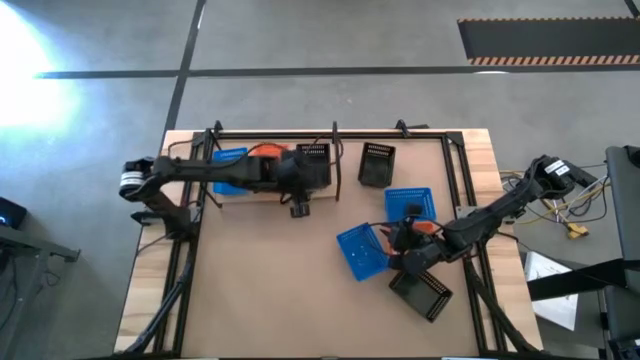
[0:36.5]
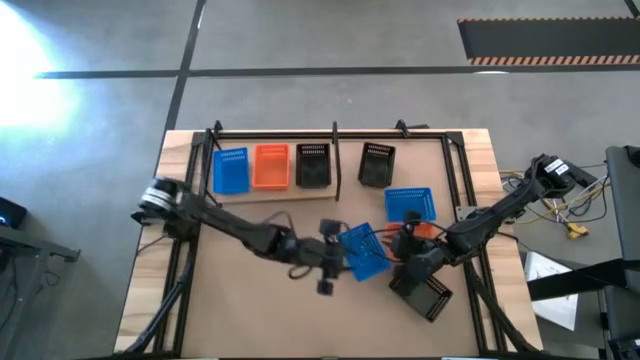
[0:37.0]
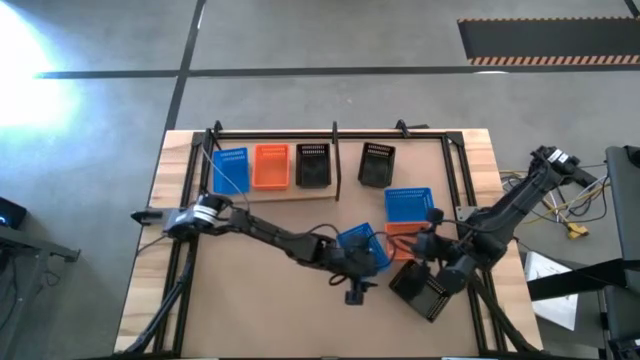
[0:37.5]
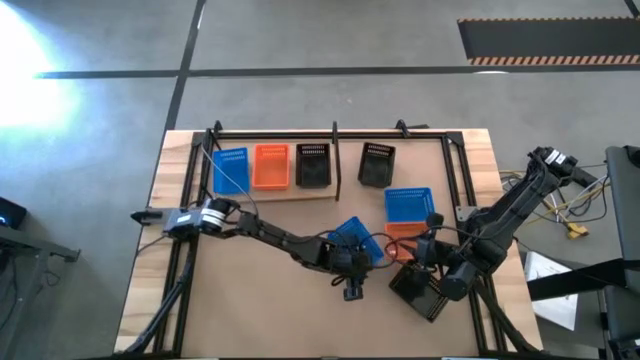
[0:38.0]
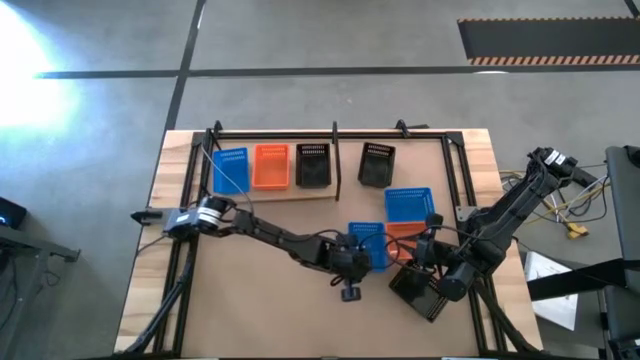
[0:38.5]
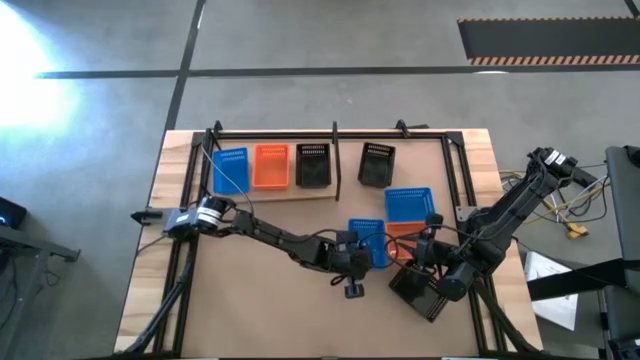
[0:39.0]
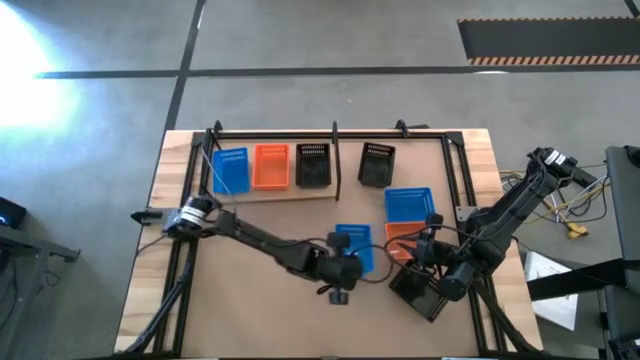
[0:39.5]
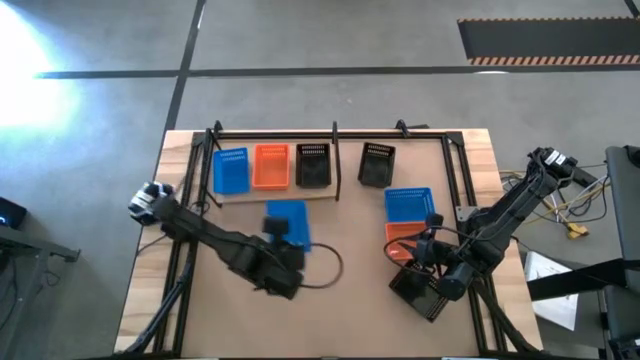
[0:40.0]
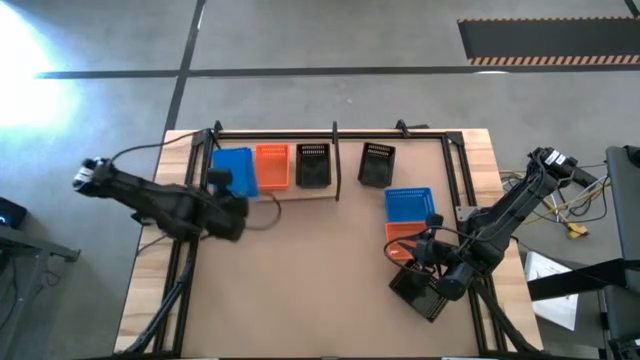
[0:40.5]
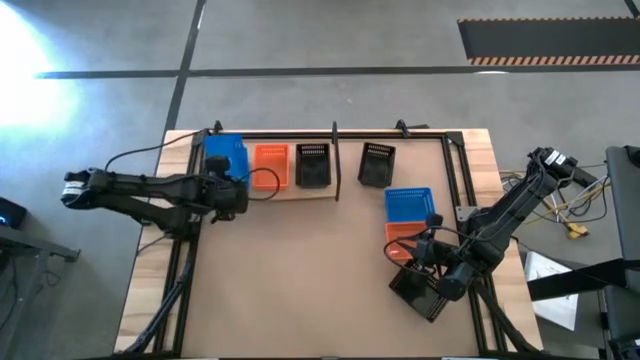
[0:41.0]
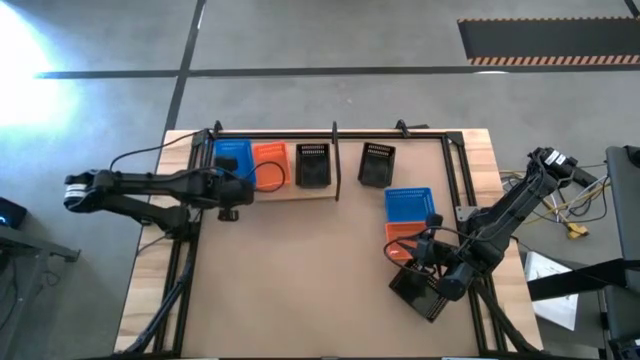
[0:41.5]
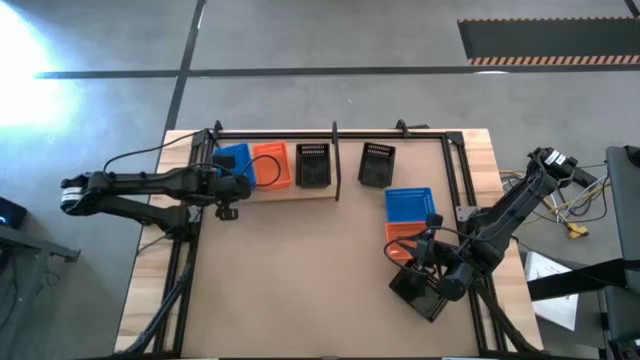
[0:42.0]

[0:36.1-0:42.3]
Task: Stack baskets on shelf by color
Stack the bottom blue basket on top of the other blue basket on the shelf

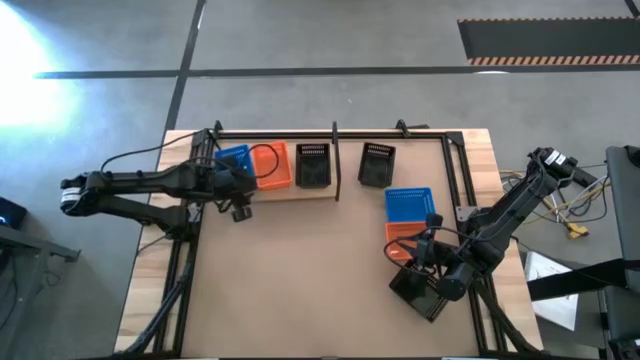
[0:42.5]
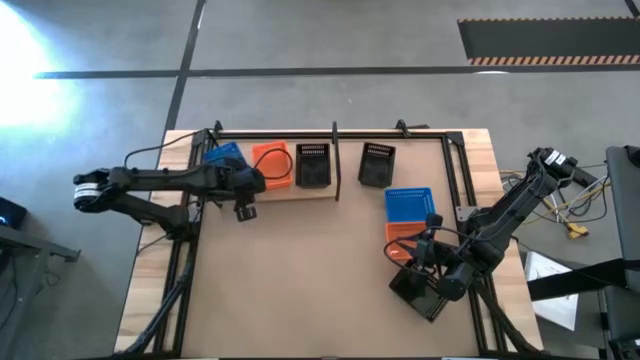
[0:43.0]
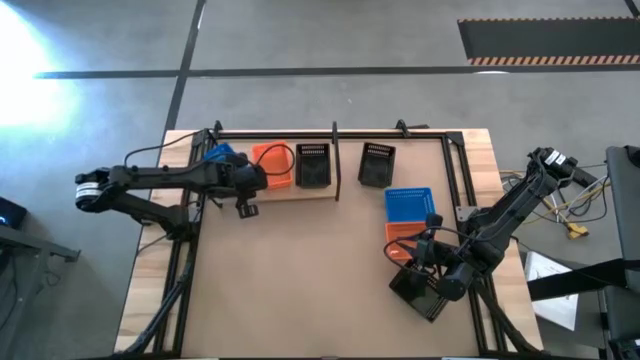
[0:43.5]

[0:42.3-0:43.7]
Adjust the baskets on the shelf

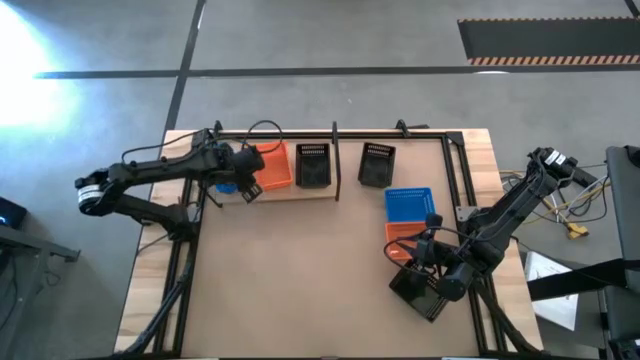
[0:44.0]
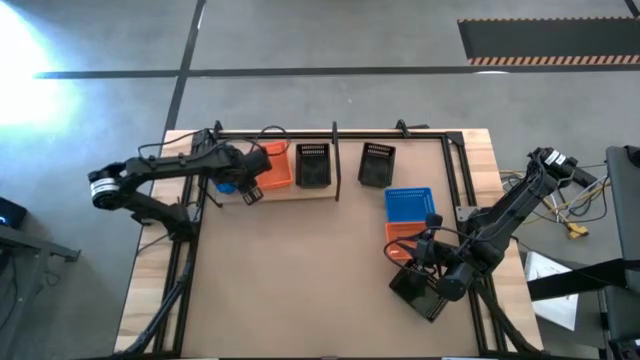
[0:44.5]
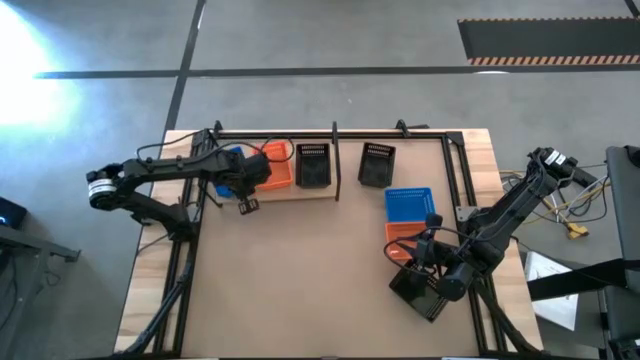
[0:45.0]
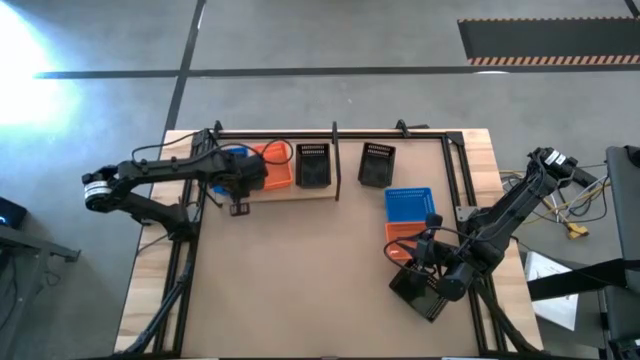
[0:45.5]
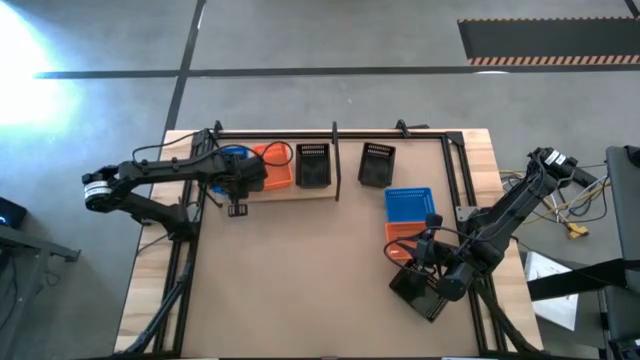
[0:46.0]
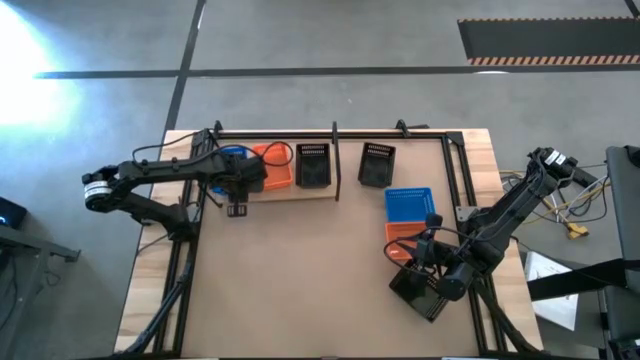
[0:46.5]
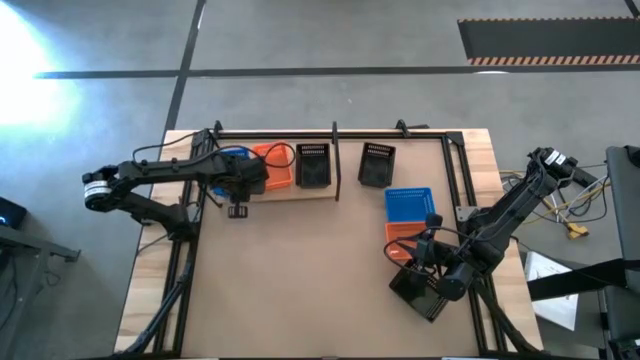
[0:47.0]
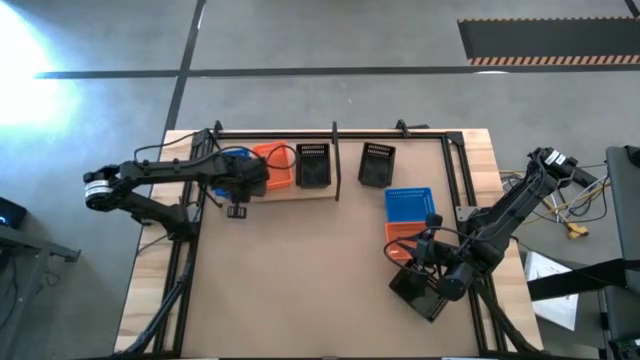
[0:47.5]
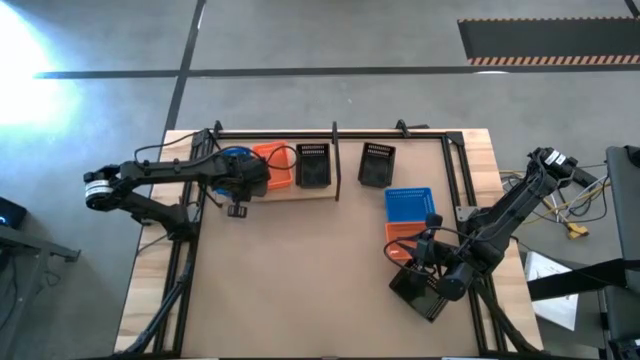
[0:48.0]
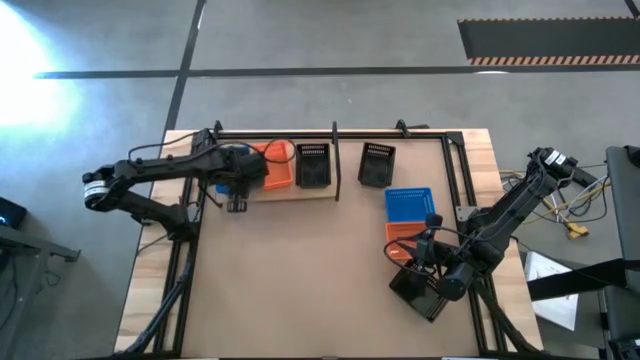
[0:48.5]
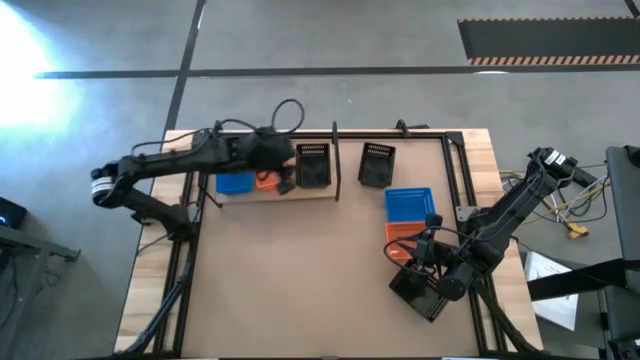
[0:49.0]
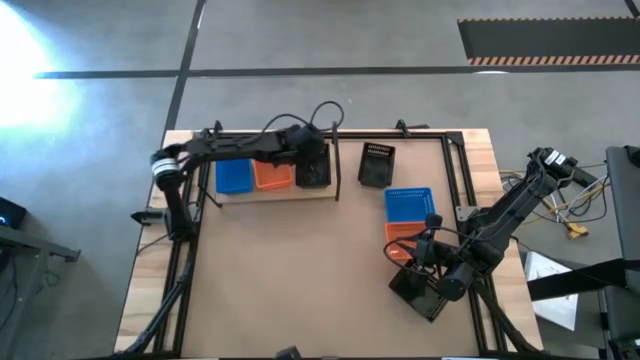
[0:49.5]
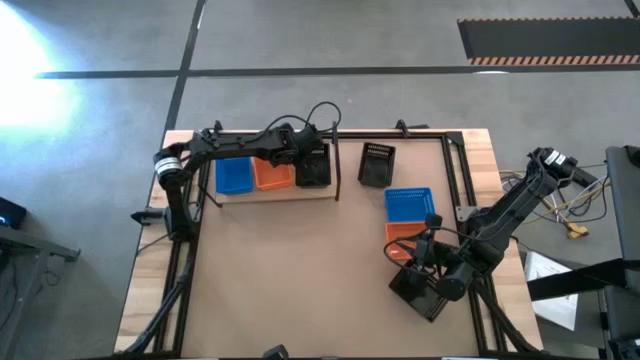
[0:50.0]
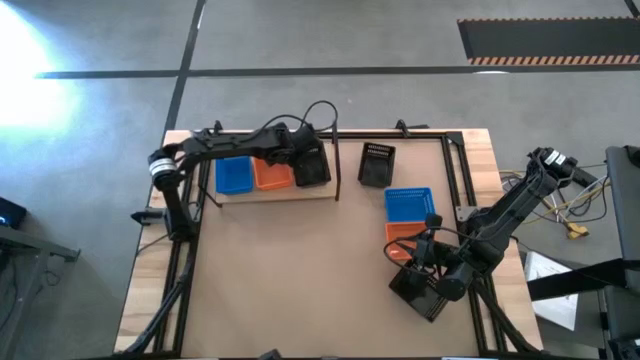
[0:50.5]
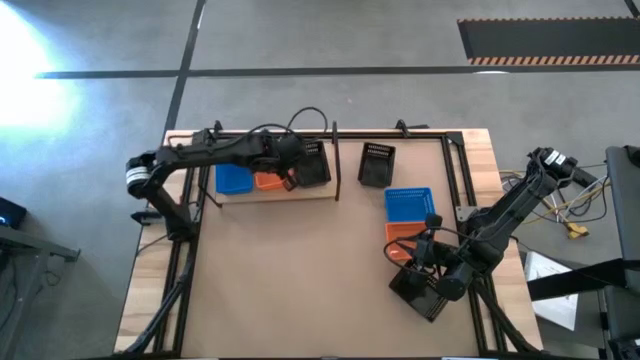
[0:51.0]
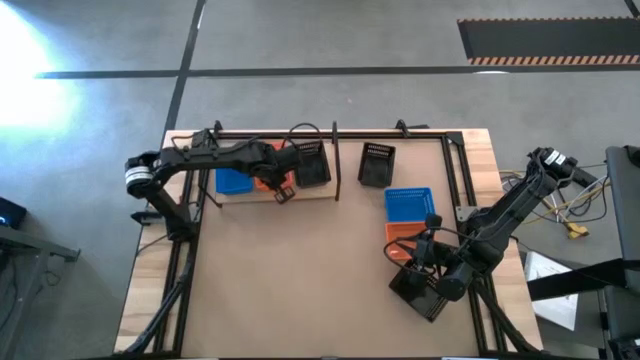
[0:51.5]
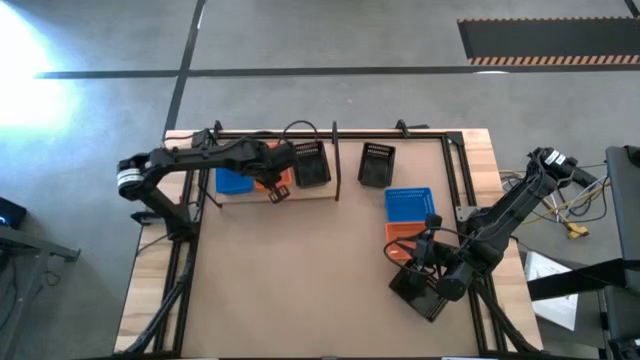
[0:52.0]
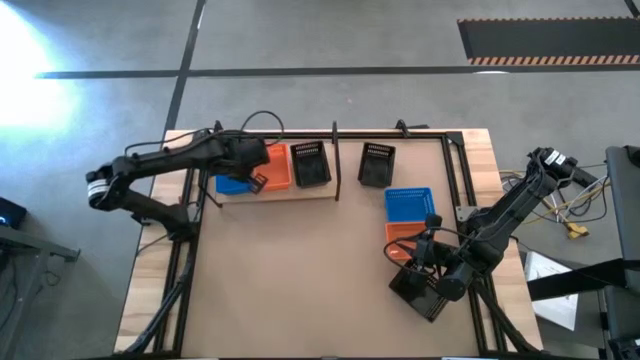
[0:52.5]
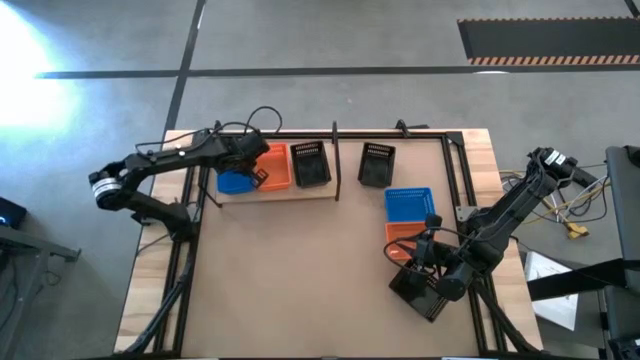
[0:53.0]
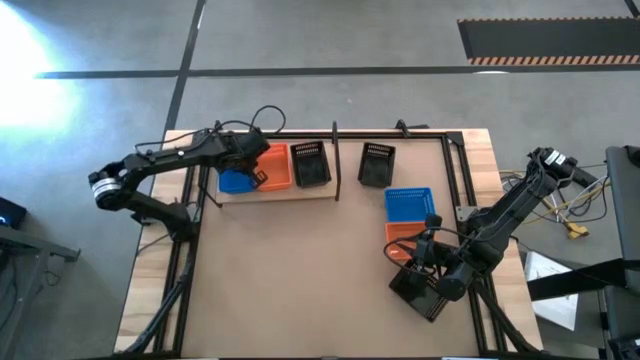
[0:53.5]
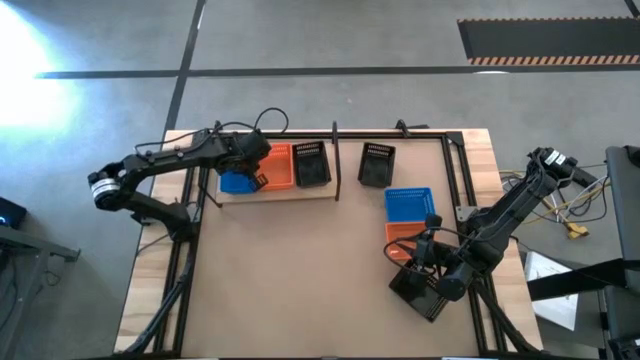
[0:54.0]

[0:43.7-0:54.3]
Adjust the baskets on the shelf

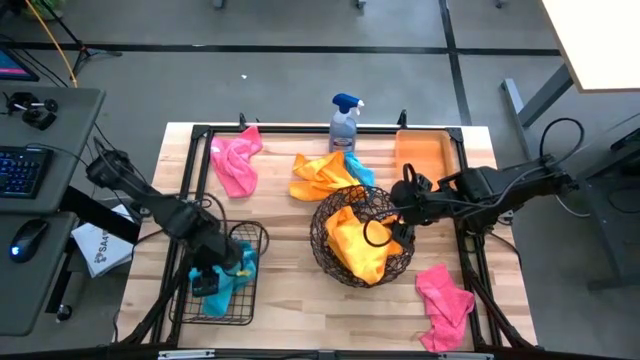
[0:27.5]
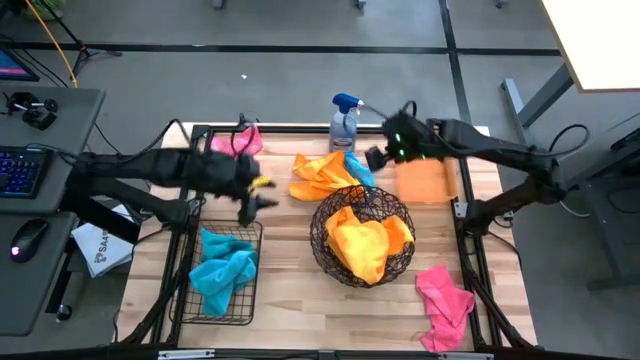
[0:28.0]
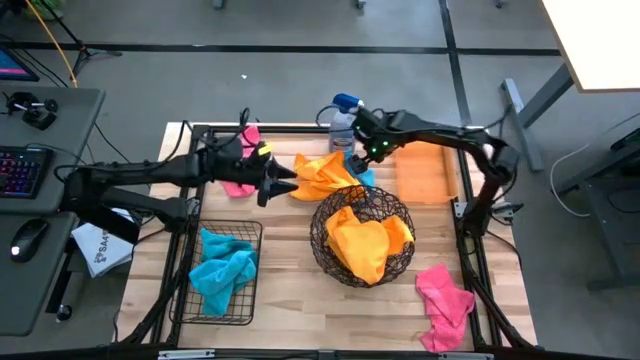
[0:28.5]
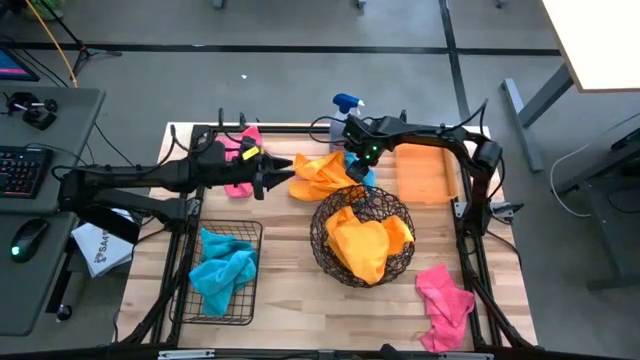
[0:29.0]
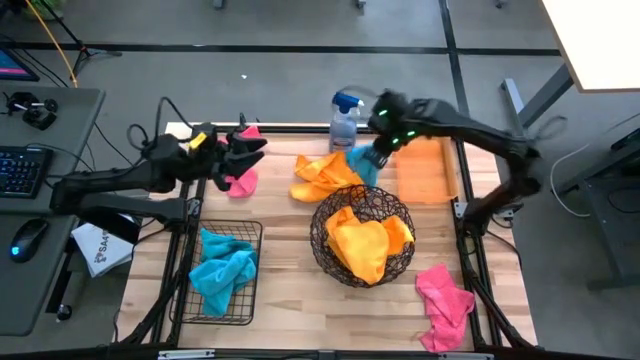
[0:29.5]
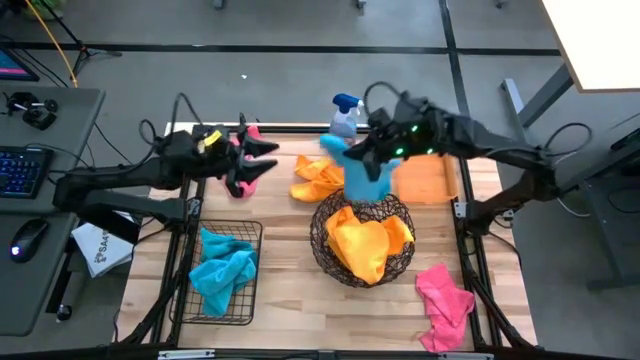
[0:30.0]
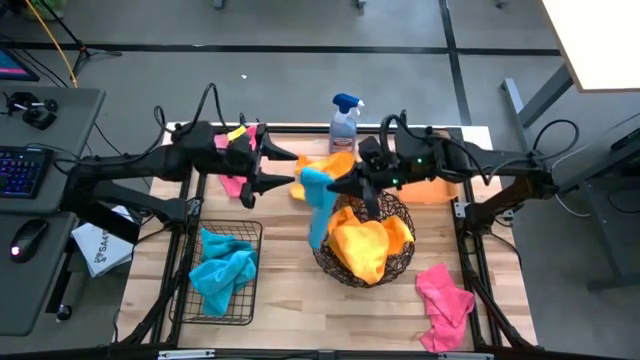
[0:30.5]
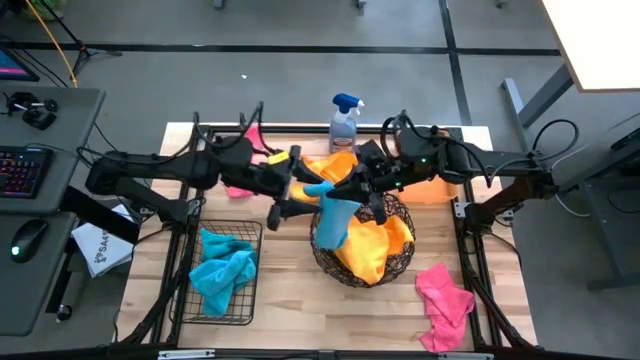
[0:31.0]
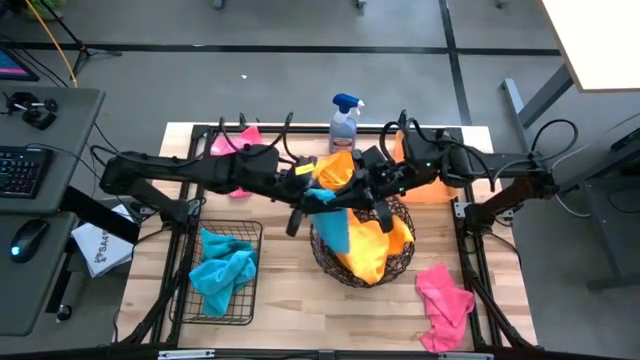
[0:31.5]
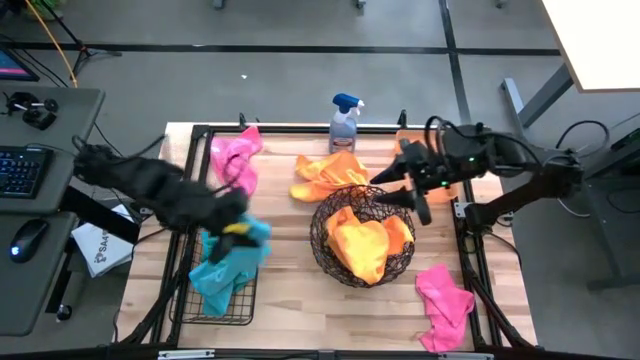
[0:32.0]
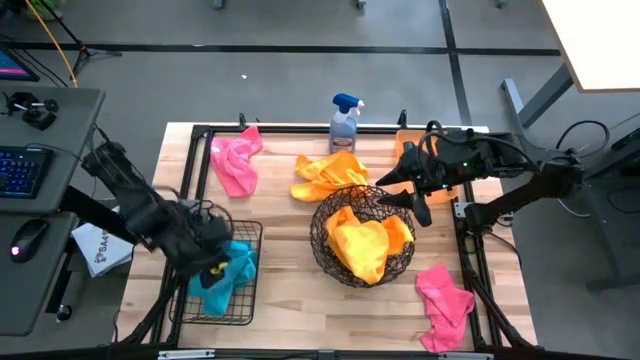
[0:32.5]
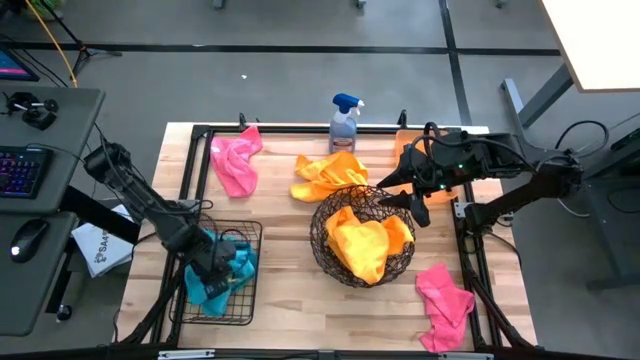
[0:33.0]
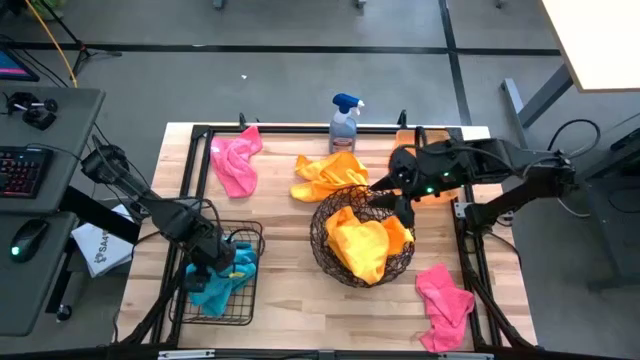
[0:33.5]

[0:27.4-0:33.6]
Task: Sort microfiber towel by color & place in baskets
Put the blue microfiber cloth into the wire basket
